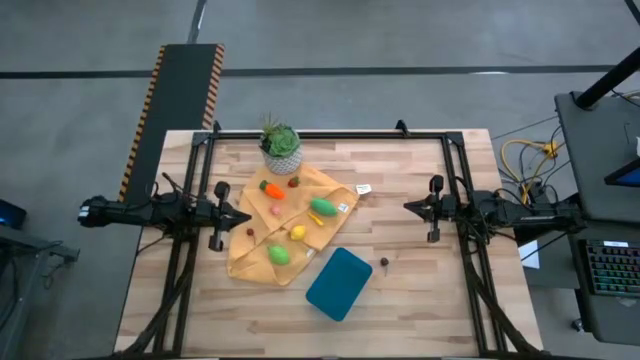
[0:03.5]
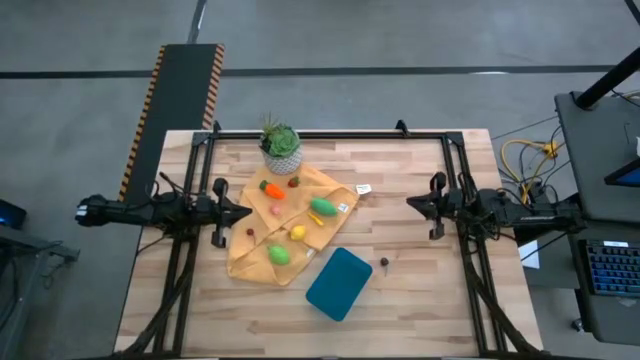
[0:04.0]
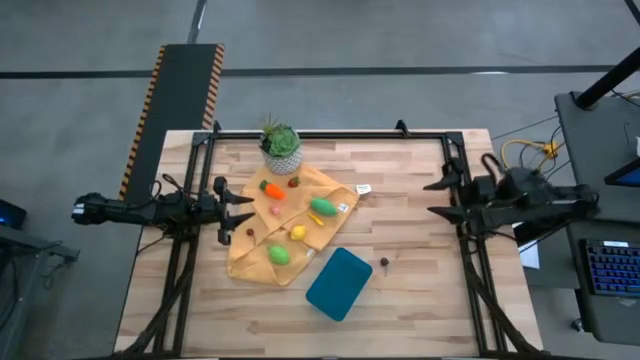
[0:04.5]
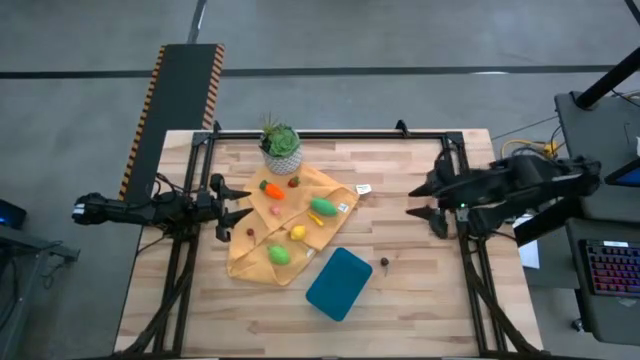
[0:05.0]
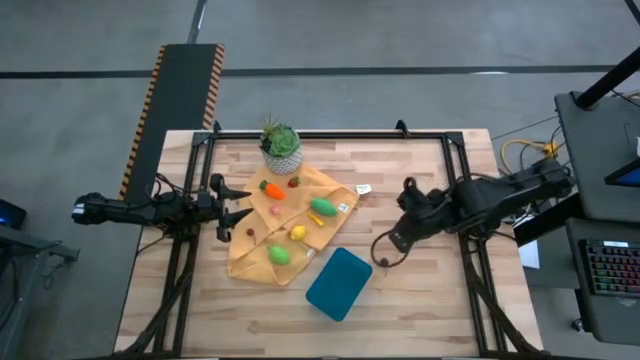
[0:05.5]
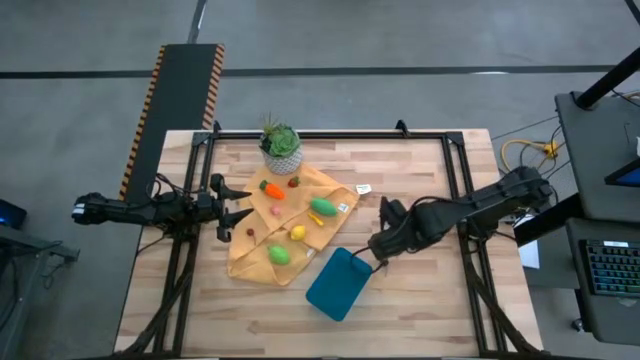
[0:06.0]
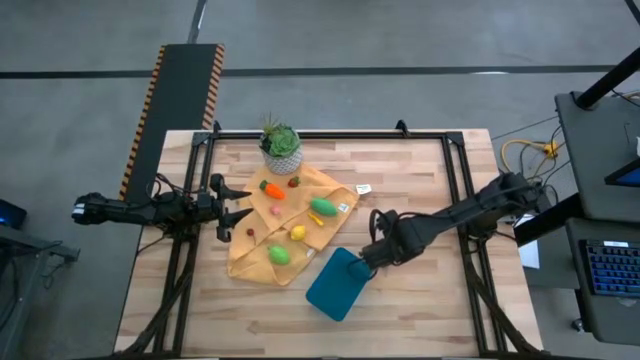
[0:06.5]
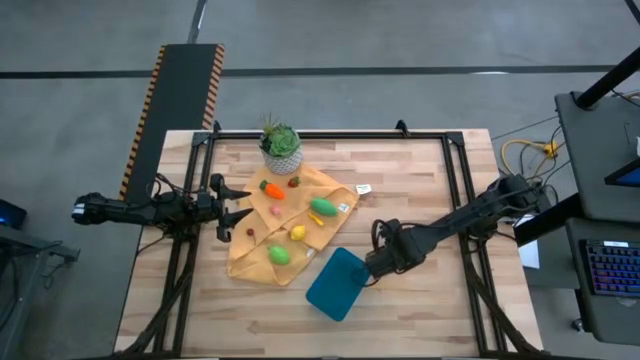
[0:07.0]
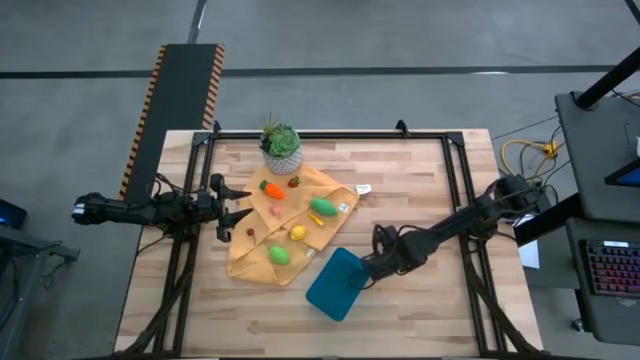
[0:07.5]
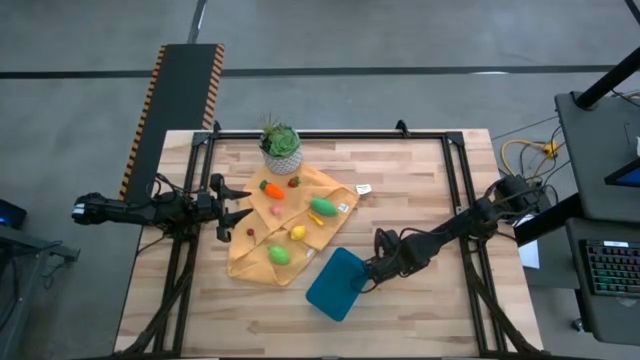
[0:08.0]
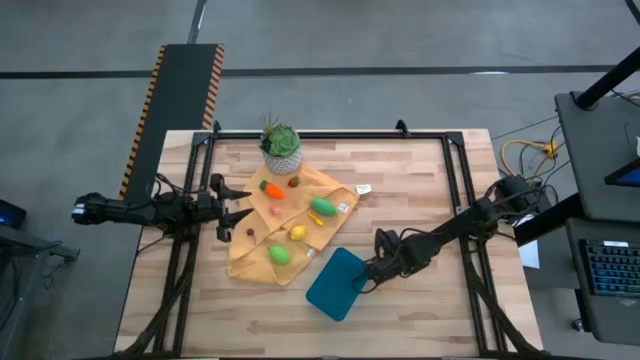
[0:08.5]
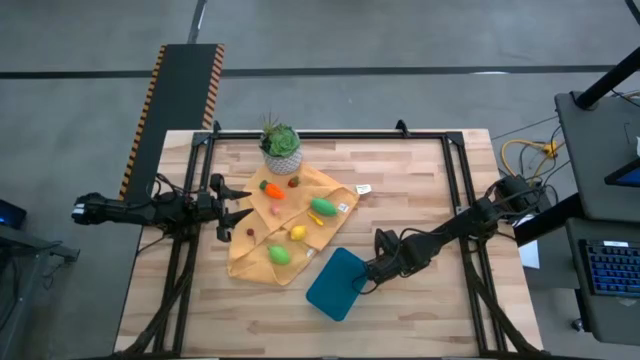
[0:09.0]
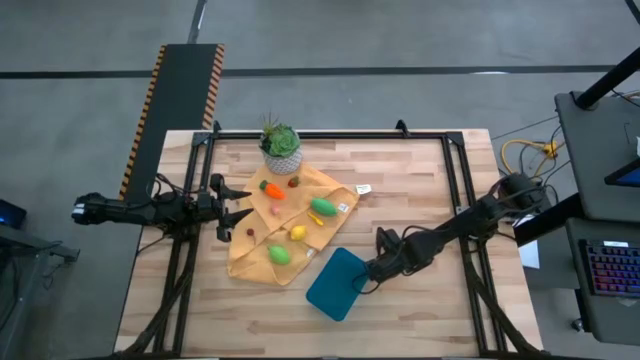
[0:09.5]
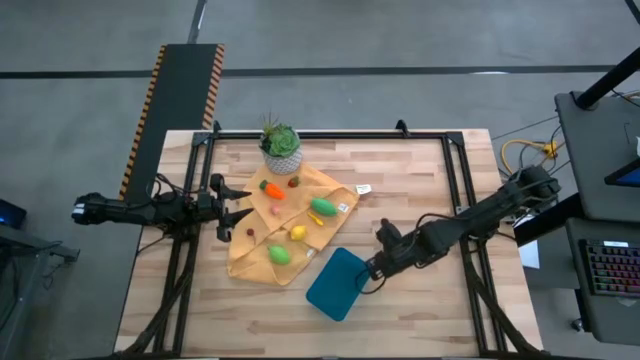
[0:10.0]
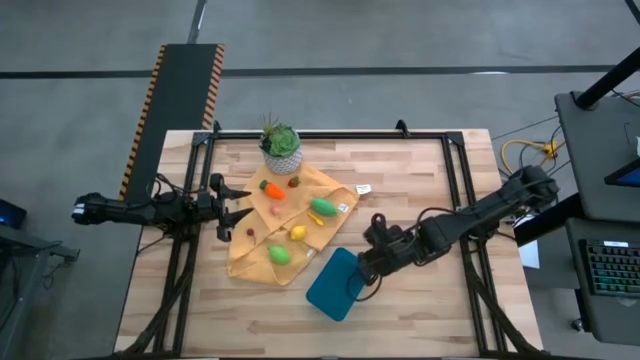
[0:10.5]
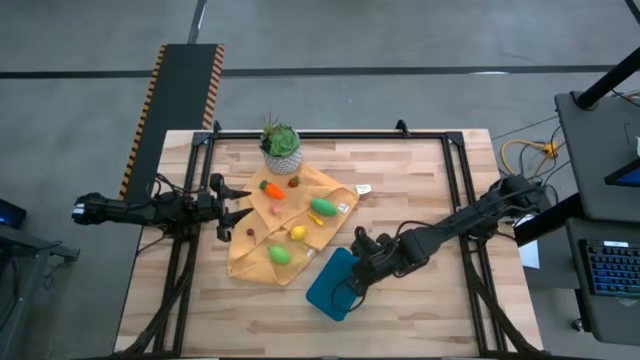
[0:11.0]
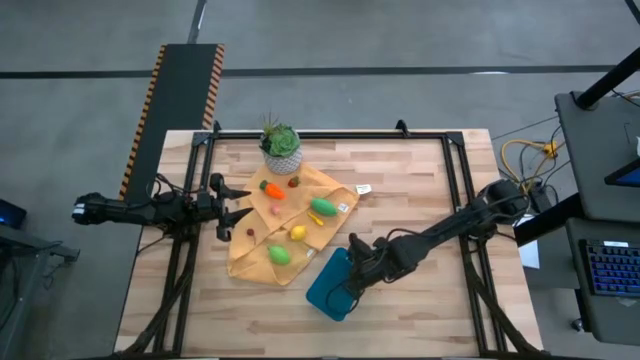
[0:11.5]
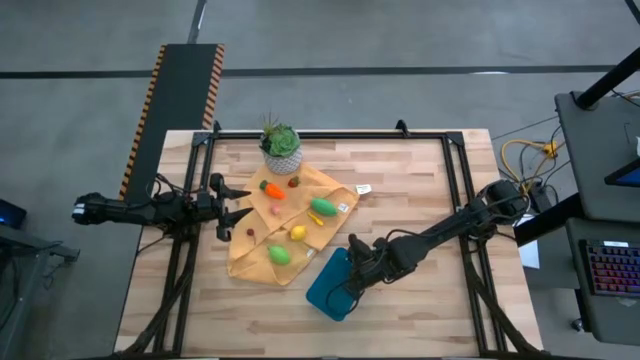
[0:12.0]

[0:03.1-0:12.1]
Task: Pick and placing Produce into tupperware
Put the black cherry into the blue bin

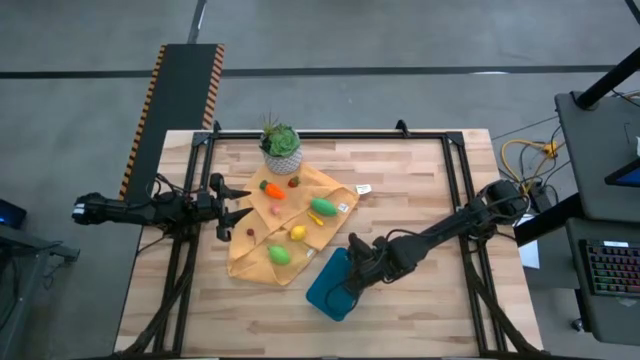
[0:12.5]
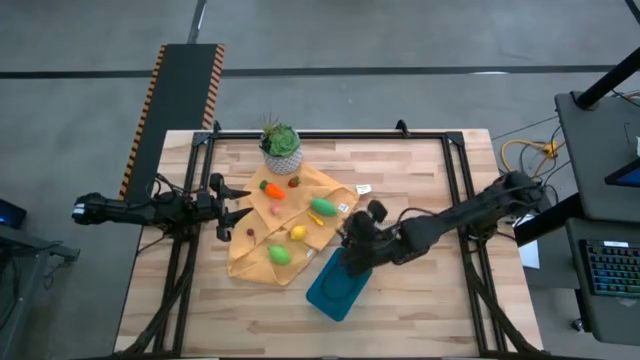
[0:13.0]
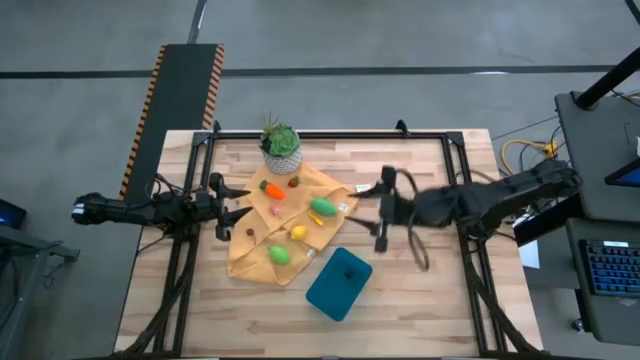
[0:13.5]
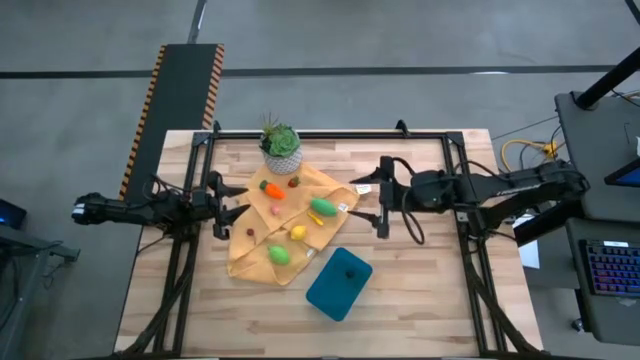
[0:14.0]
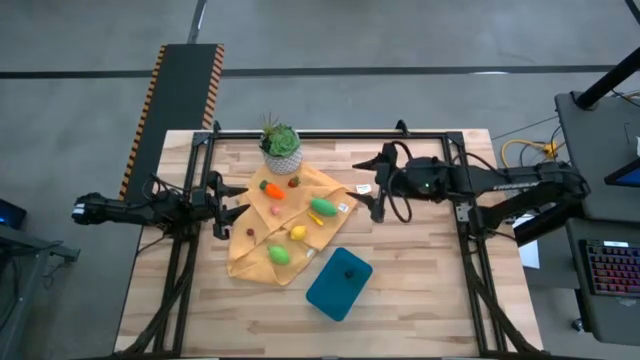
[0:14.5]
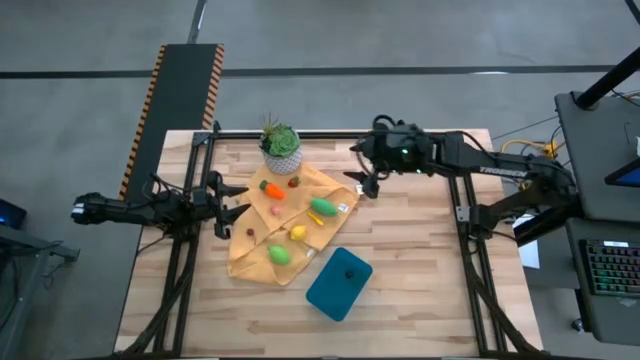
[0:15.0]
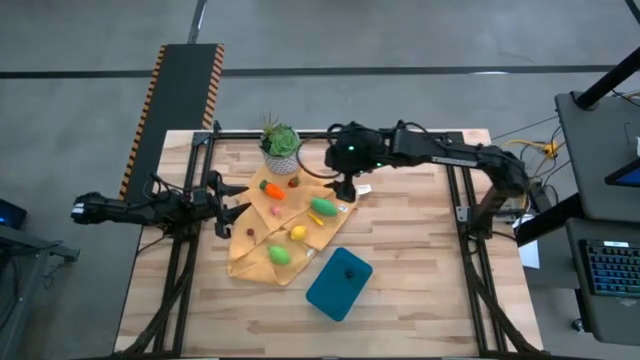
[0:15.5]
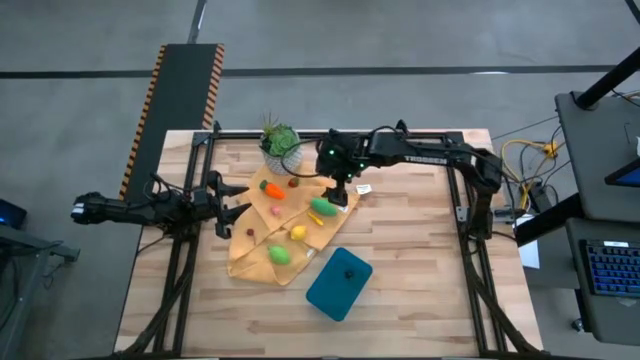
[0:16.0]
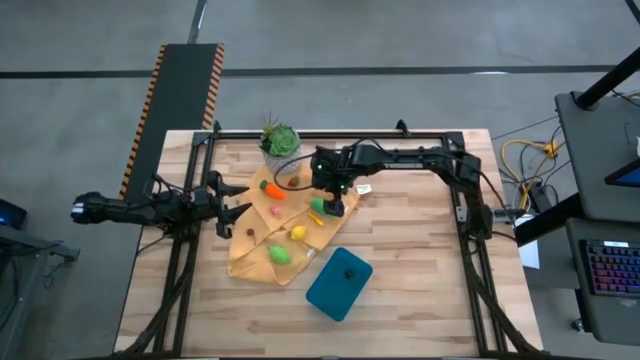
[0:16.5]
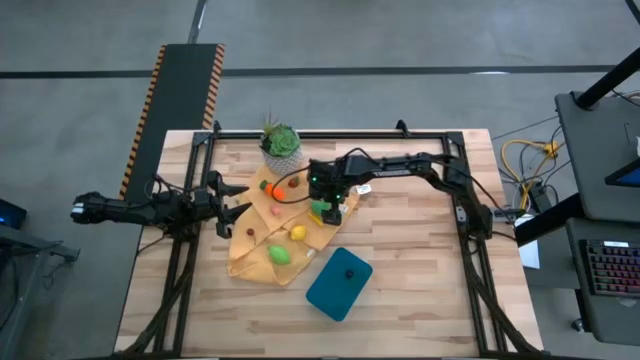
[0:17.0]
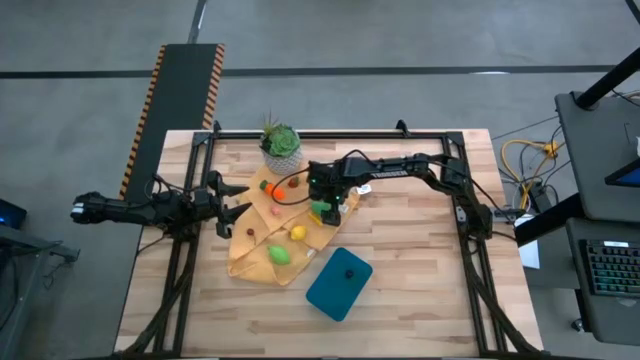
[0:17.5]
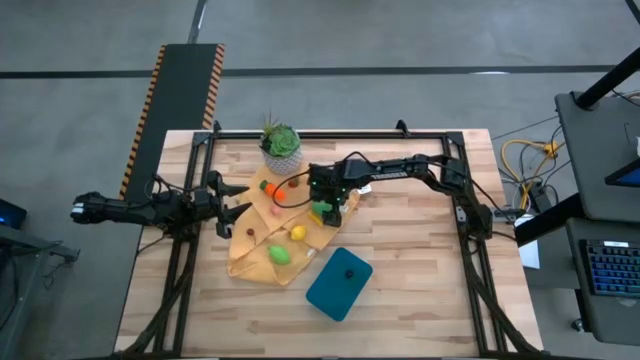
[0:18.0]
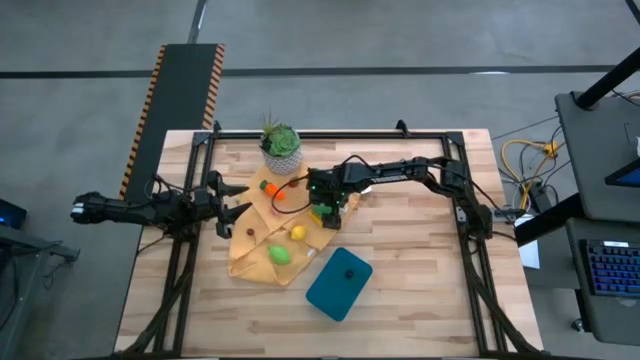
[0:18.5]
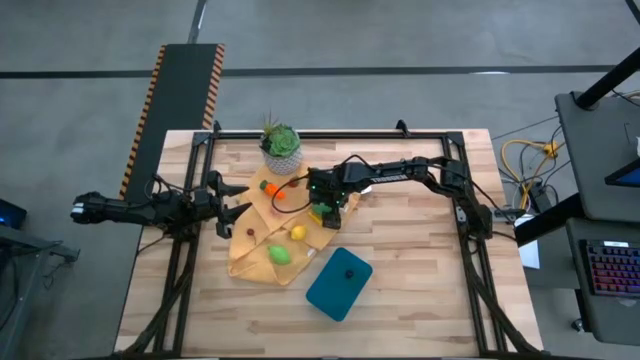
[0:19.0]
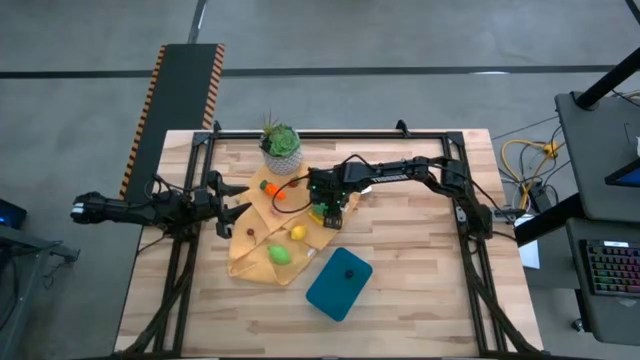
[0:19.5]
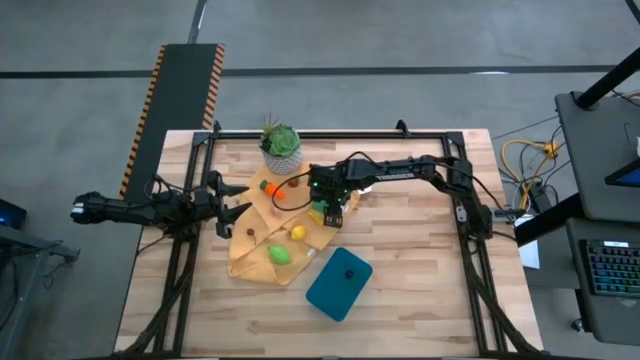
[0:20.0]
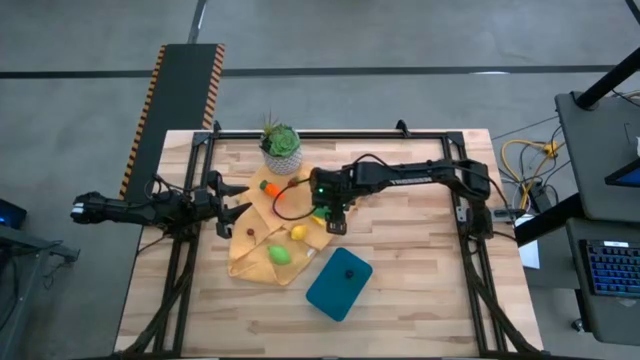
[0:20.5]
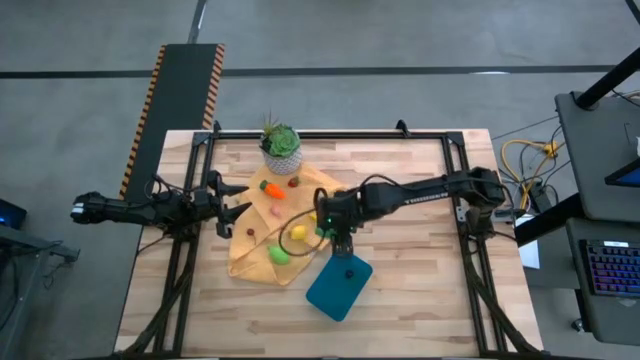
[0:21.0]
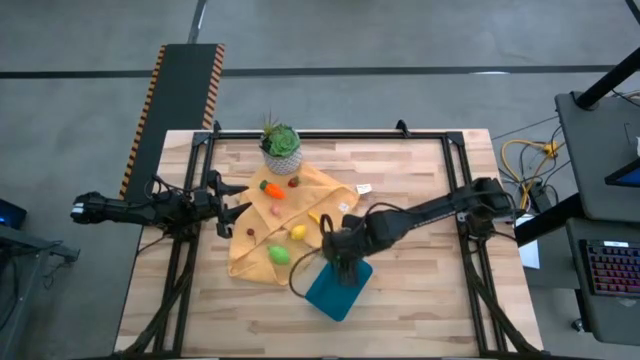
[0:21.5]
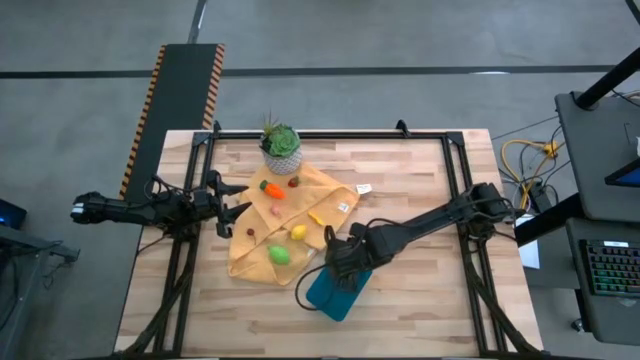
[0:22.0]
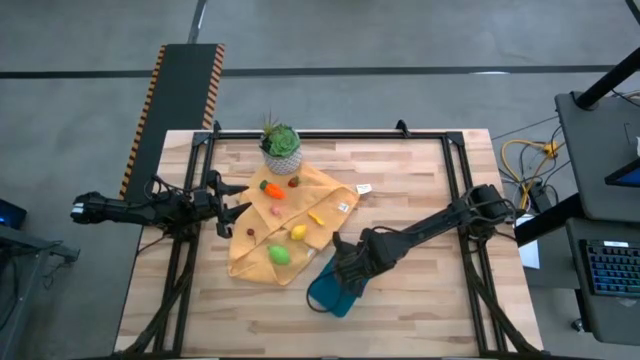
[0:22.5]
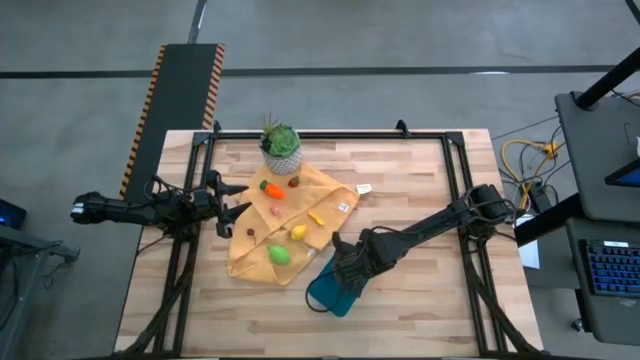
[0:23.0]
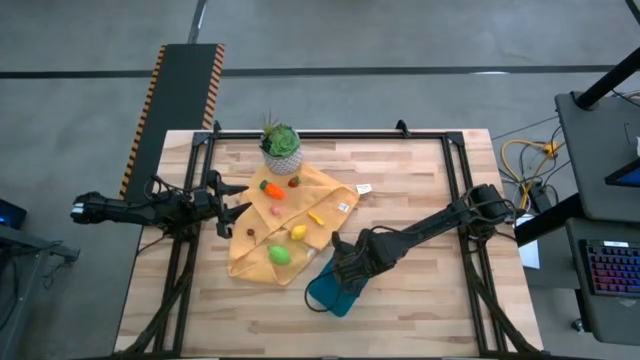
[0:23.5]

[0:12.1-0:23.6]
Put the green corn into the blue bin

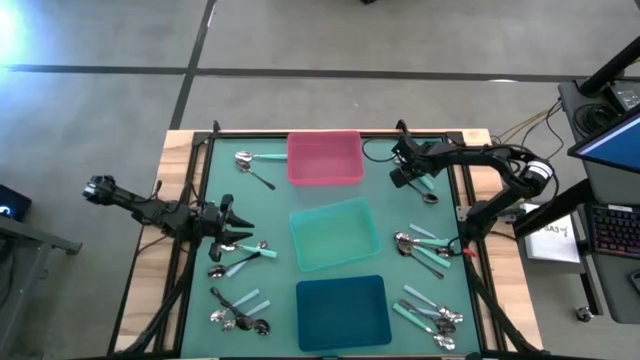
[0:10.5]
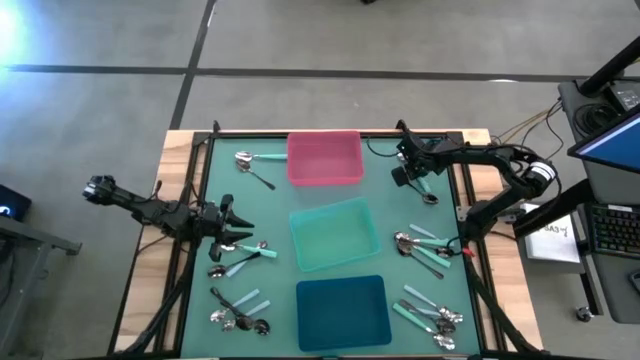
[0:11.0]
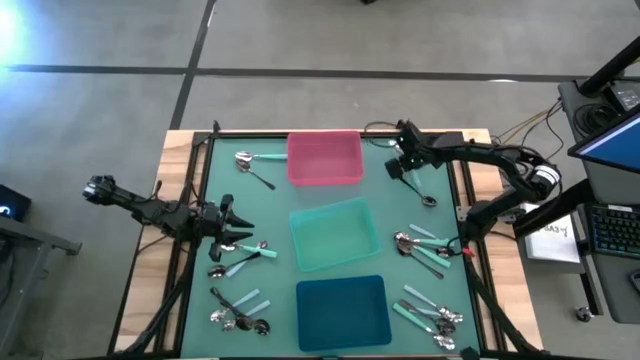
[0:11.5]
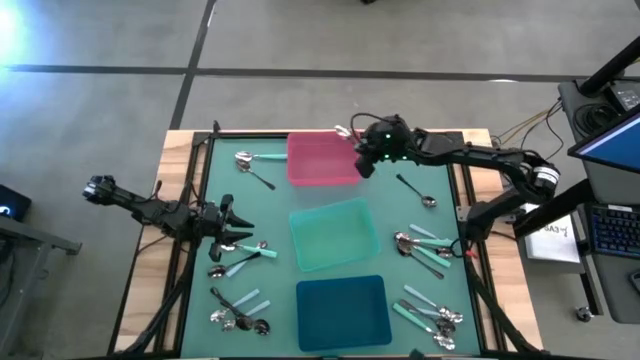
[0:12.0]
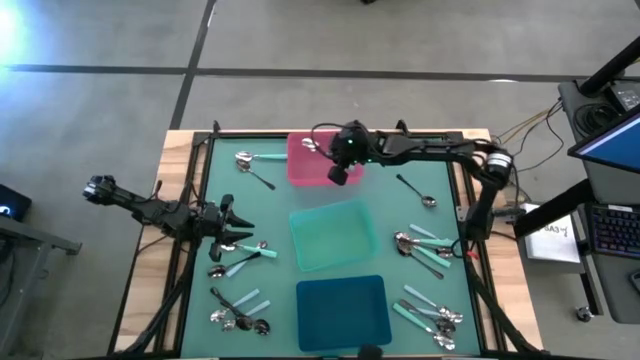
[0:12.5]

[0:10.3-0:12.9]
Task: Sort silverware by color (type)
Put the green spoon into the pink bin
